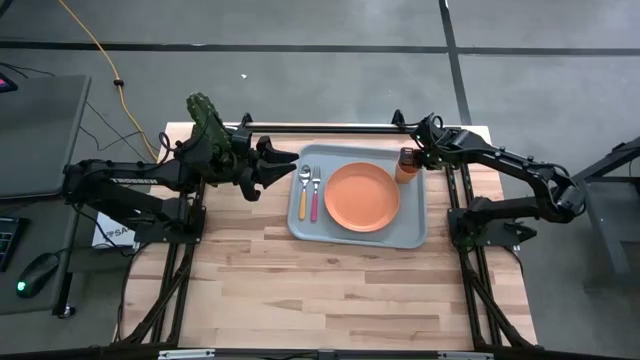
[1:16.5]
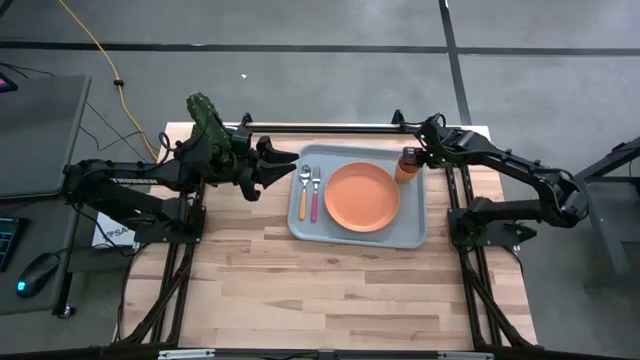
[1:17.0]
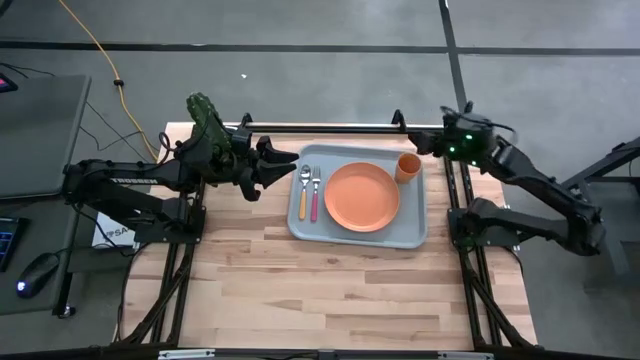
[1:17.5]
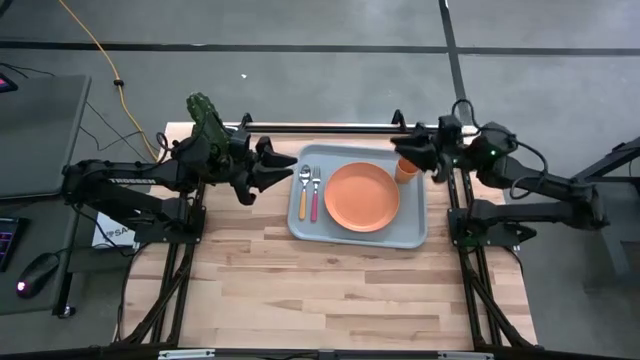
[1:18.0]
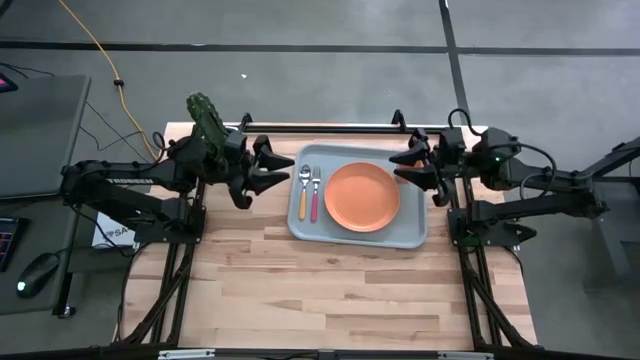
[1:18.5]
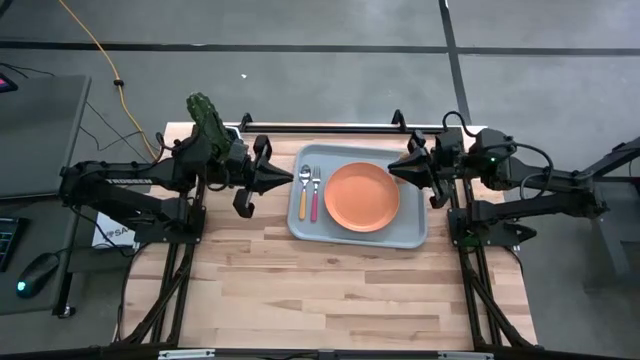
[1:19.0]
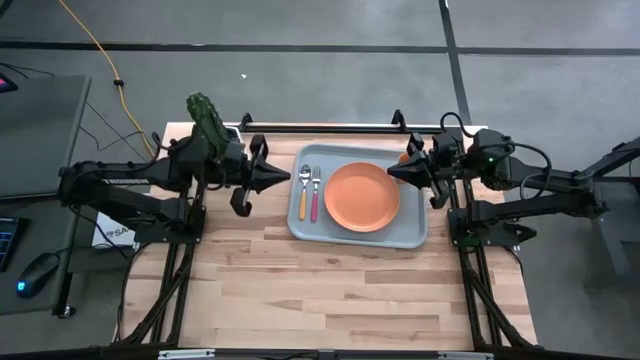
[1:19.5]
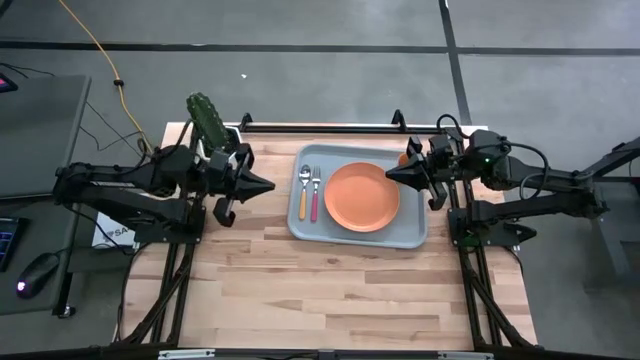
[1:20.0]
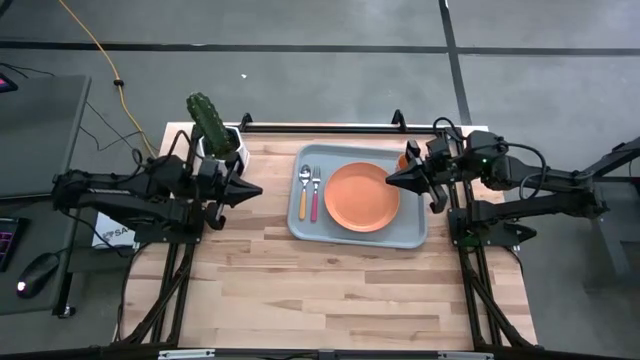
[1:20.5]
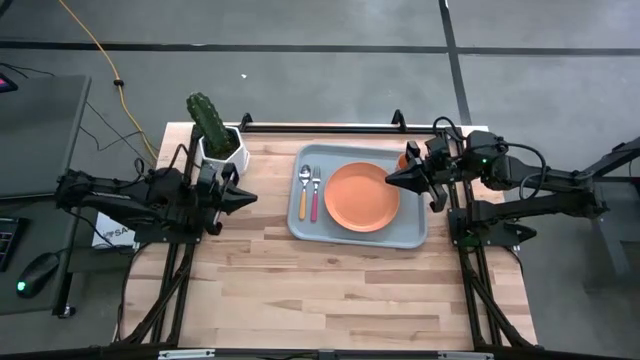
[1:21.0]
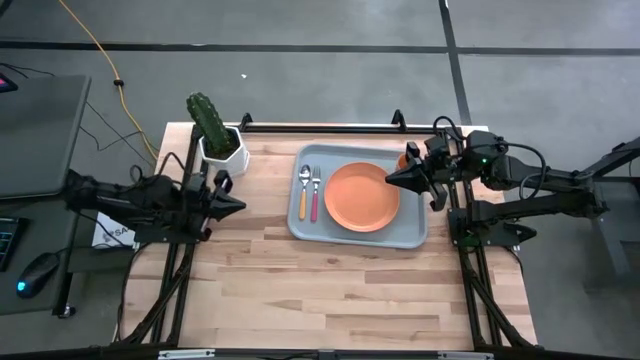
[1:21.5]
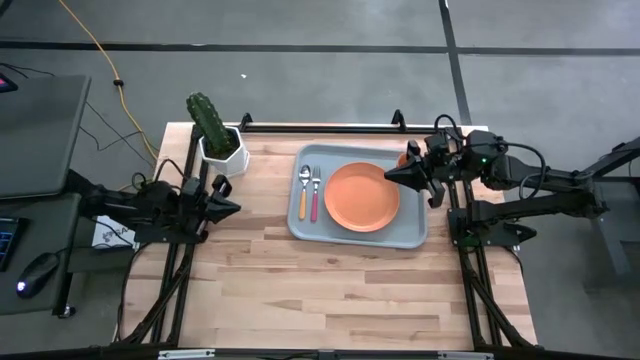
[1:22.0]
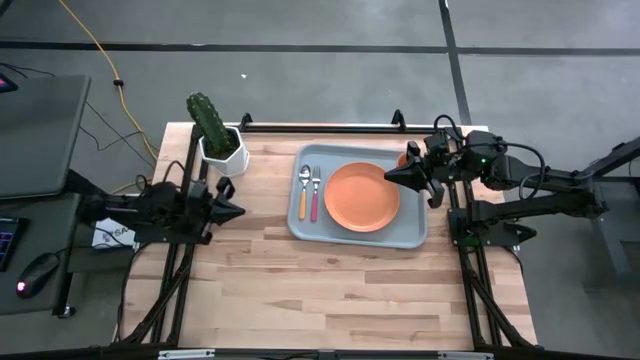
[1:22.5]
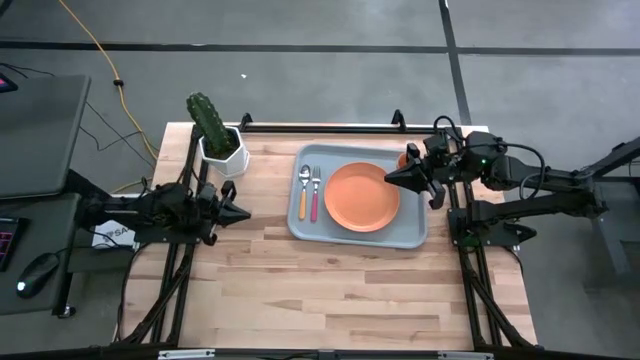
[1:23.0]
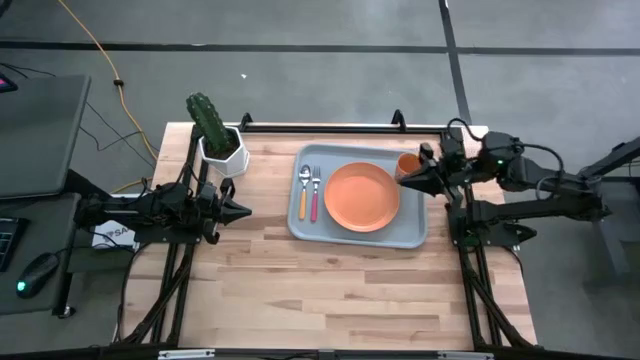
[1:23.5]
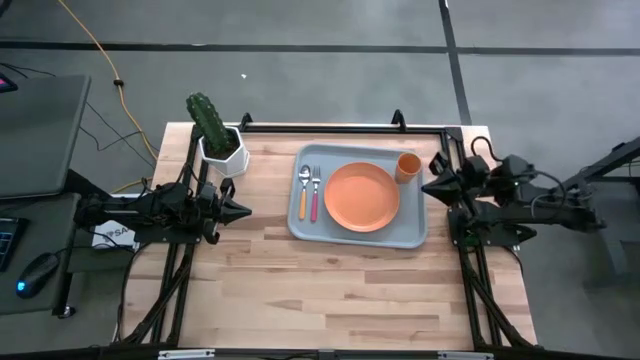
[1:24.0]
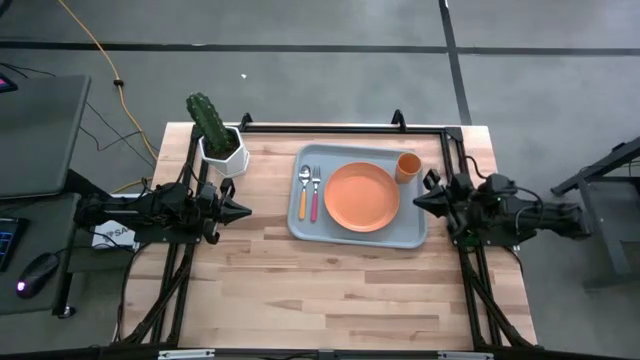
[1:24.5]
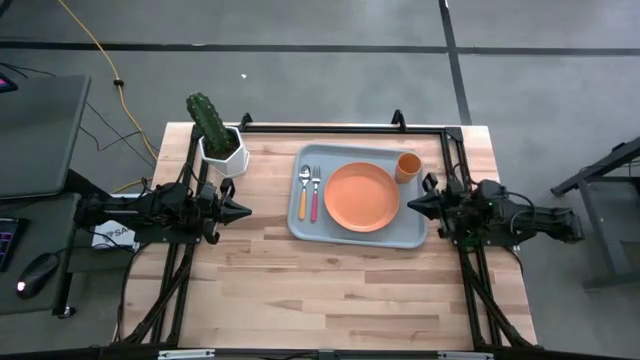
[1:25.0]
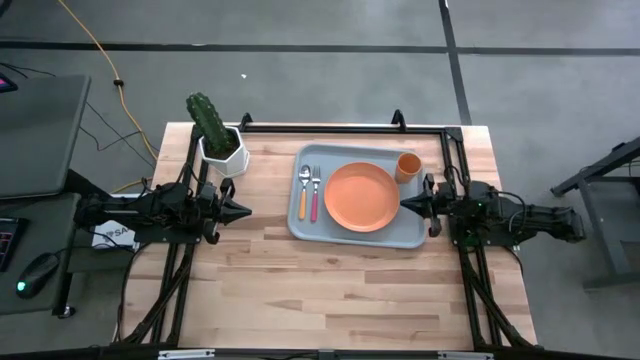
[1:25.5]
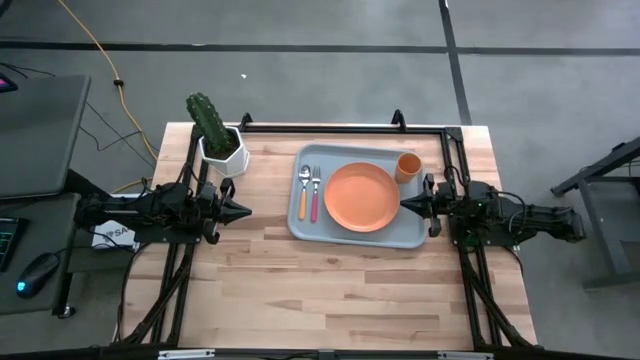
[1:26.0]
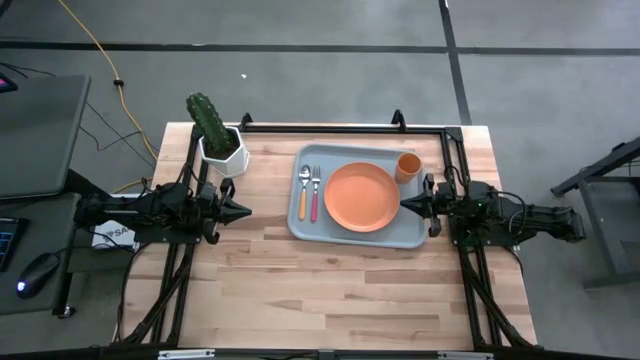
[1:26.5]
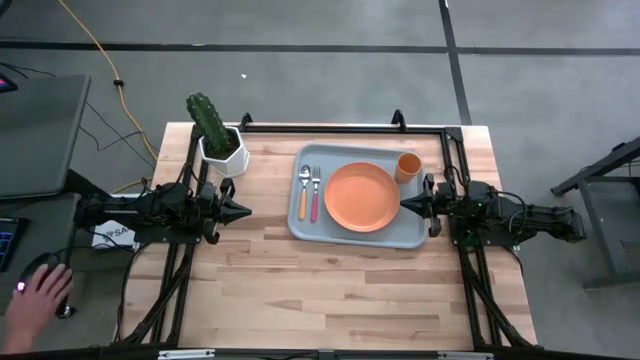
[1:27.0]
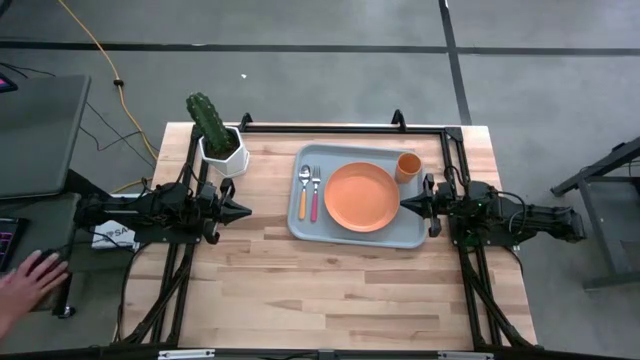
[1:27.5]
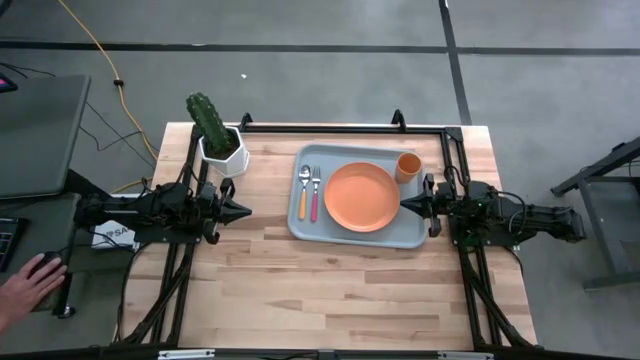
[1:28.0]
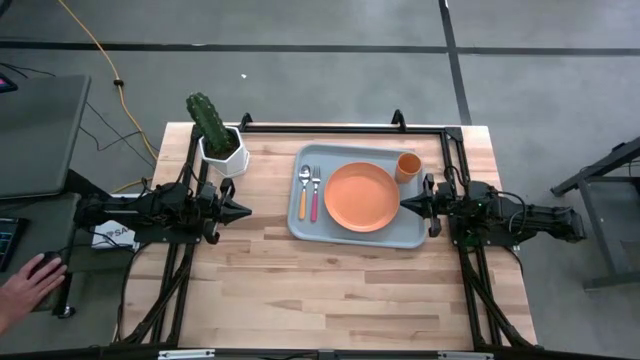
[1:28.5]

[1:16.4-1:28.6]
Task: Pick and place plate/cup/fork/spoon on tray
Return to Home Position

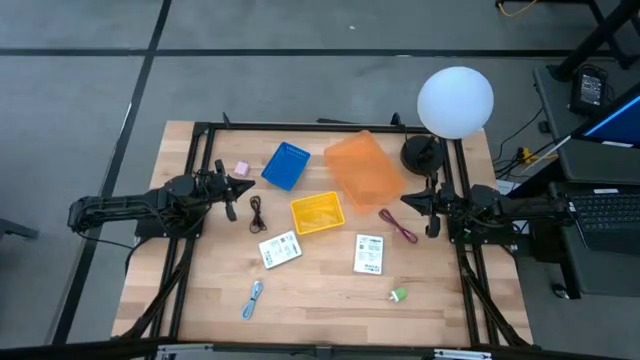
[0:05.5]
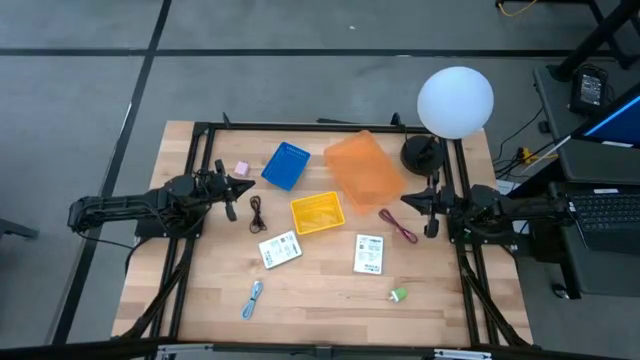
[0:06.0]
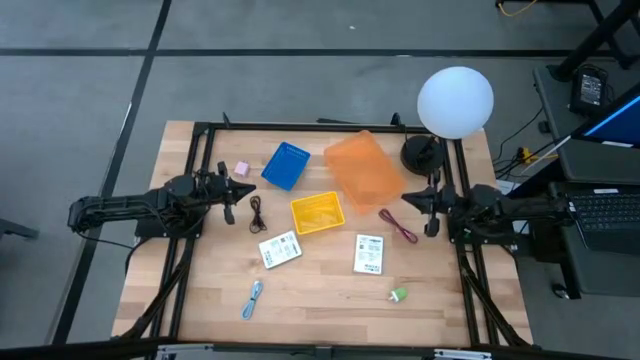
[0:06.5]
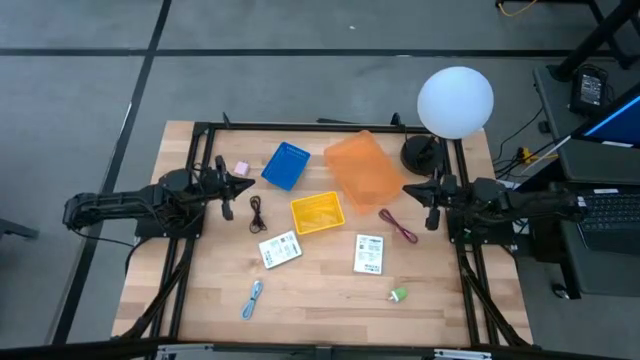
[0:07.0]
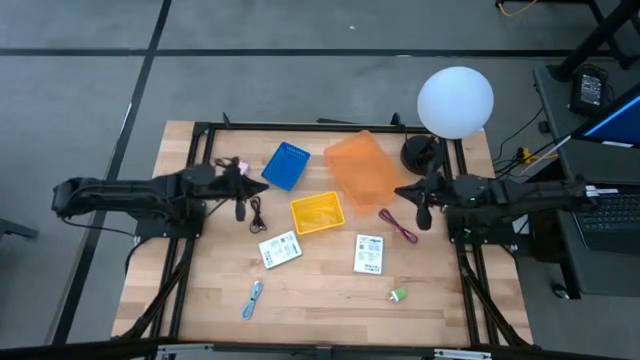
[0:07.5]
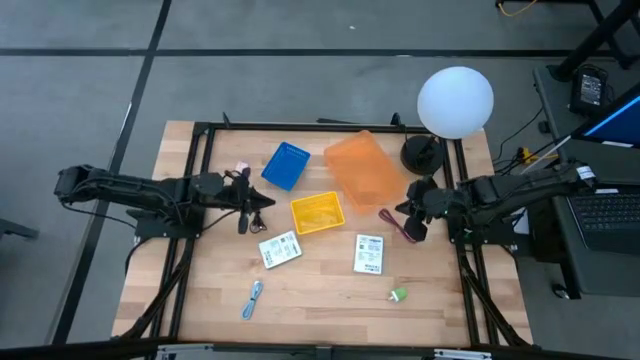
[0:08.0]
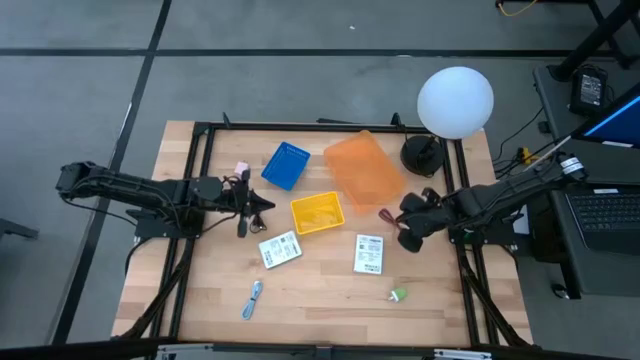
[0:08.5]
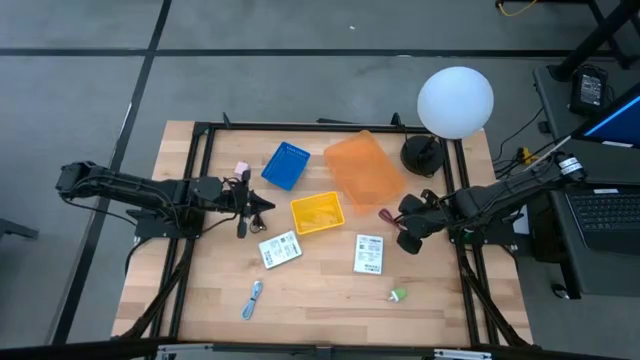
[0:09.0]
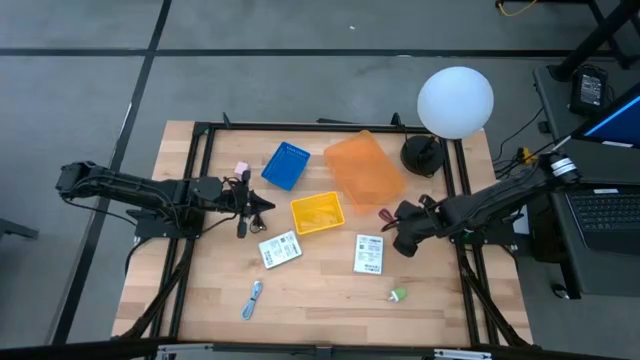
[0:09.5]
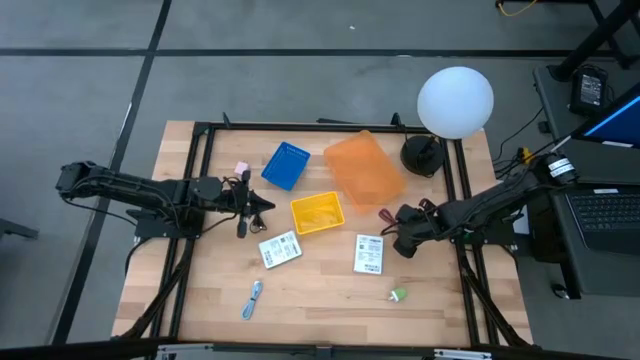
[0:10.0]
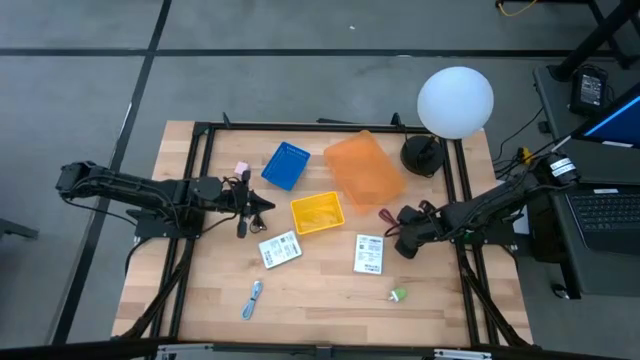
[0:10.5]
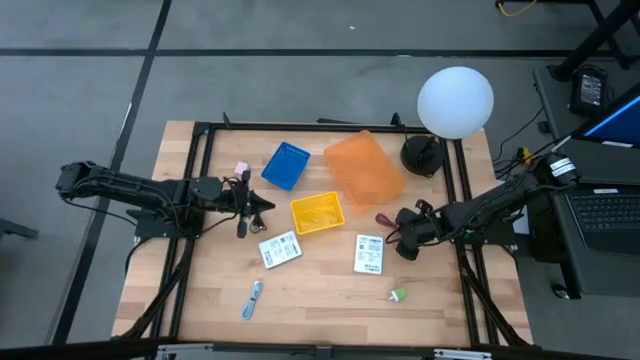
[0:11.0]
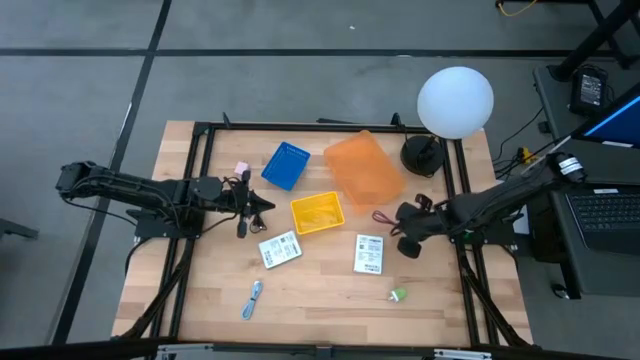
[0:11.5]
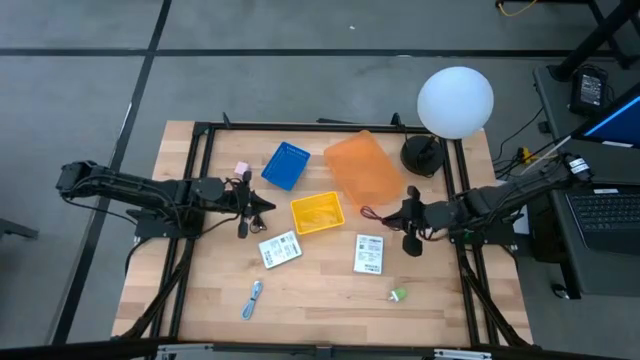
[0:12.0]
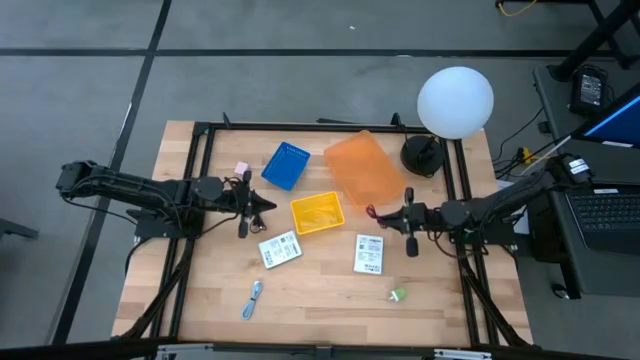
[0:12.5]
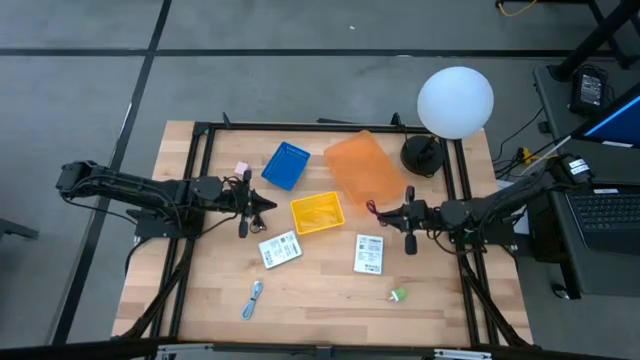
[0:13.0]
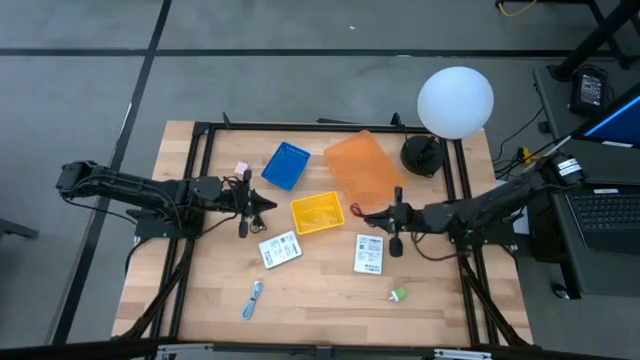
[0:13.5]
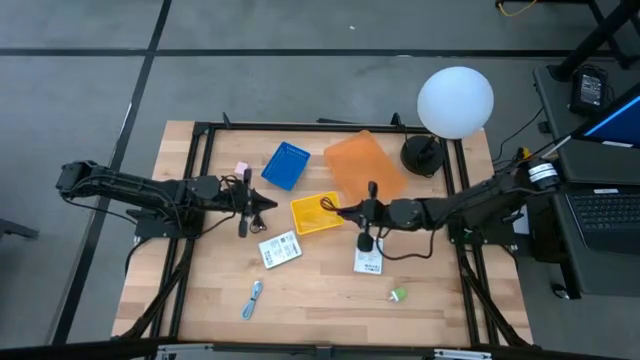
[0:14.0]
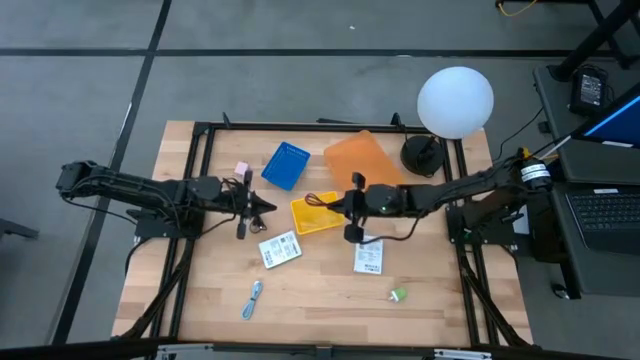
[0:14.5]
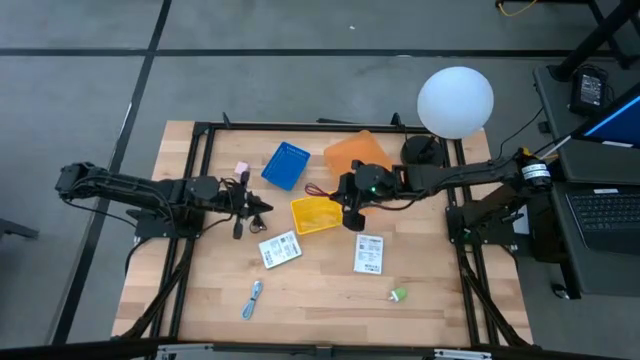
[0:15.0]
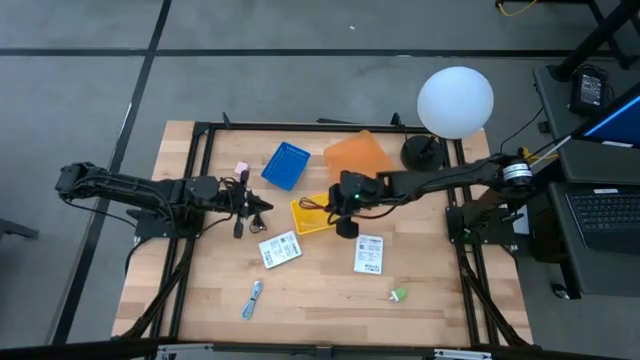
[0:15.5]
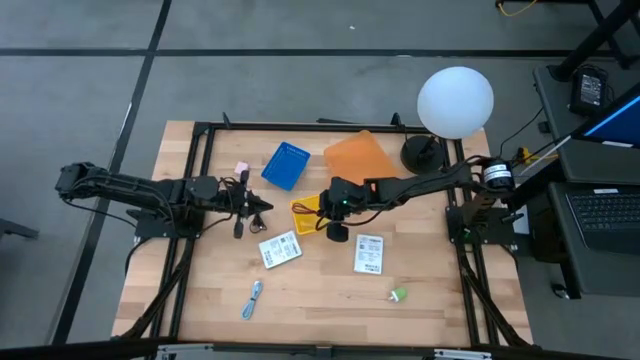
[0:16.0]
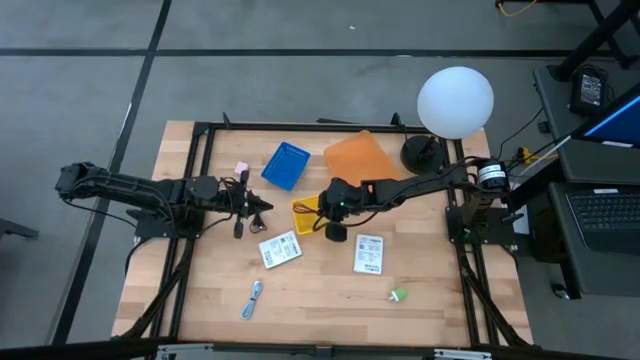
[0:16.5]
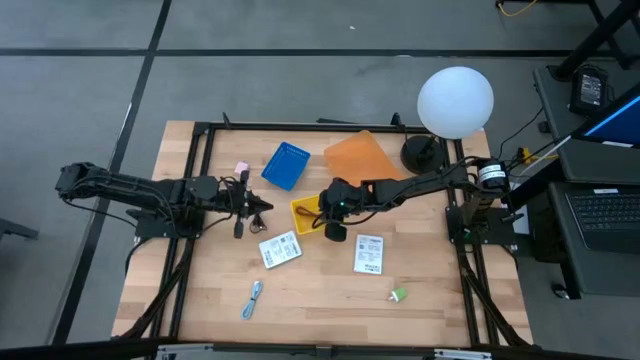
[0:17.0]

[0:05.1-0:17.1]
Task: Pick and place items into bin
Put the red USB cable into the yellow bin
